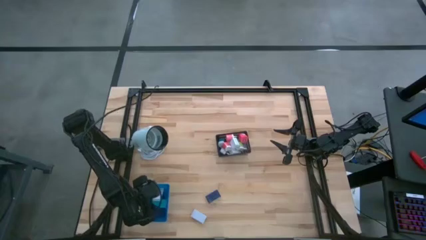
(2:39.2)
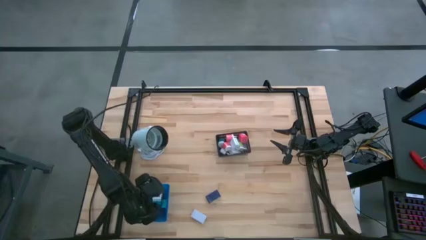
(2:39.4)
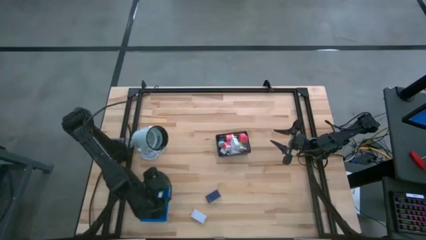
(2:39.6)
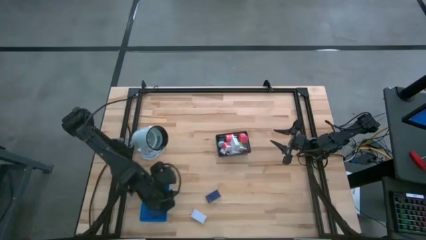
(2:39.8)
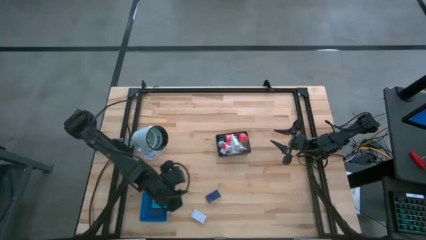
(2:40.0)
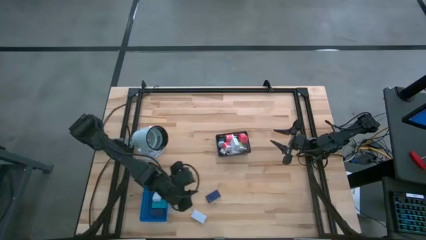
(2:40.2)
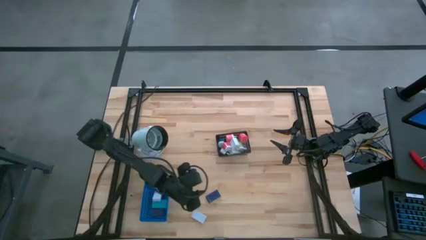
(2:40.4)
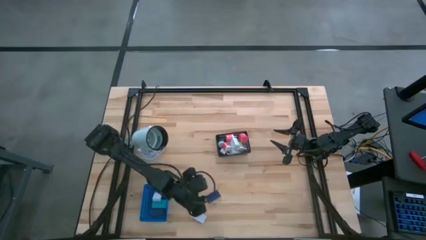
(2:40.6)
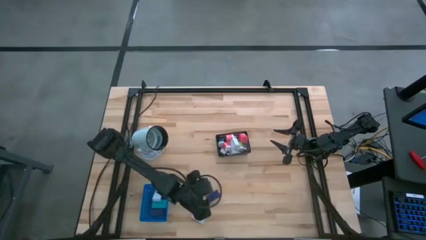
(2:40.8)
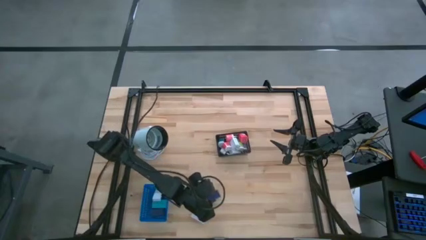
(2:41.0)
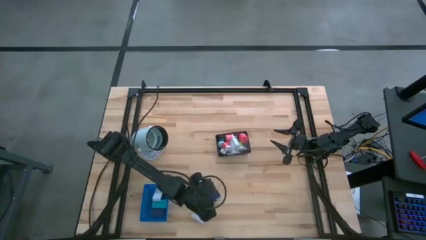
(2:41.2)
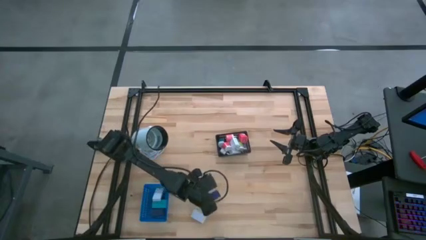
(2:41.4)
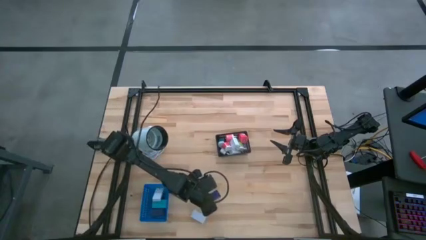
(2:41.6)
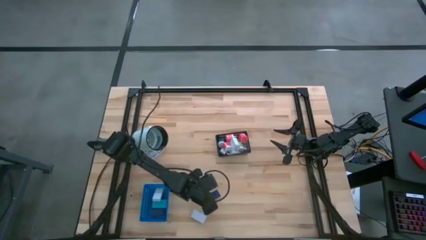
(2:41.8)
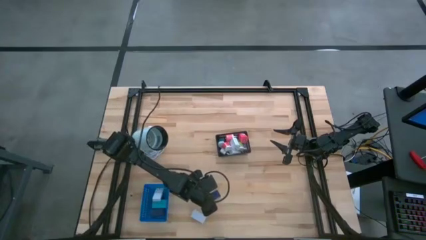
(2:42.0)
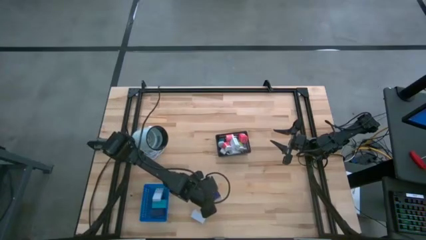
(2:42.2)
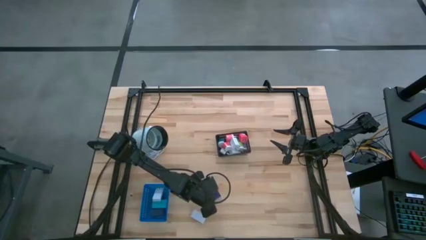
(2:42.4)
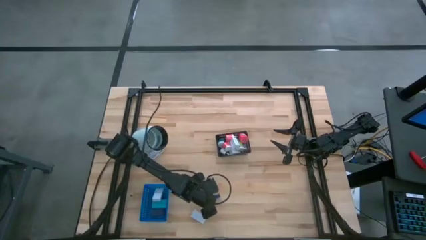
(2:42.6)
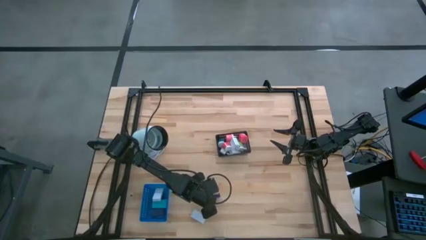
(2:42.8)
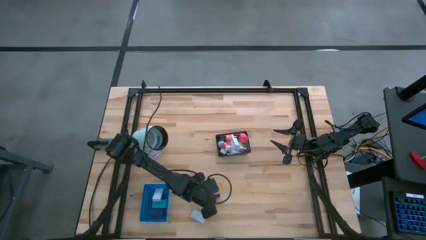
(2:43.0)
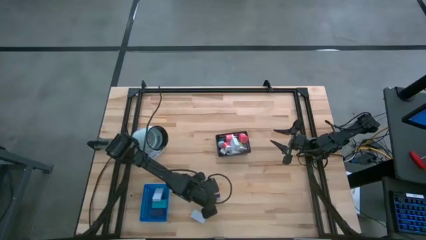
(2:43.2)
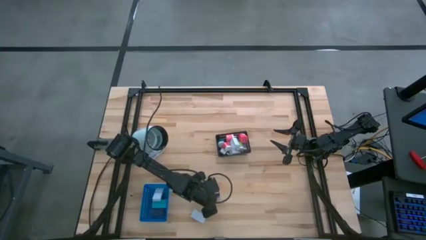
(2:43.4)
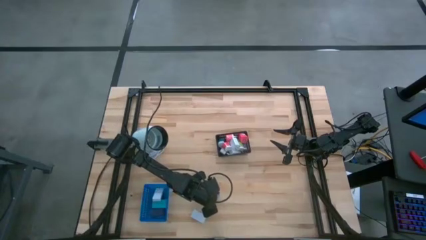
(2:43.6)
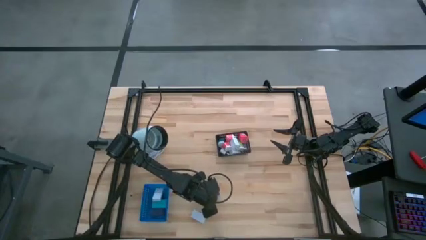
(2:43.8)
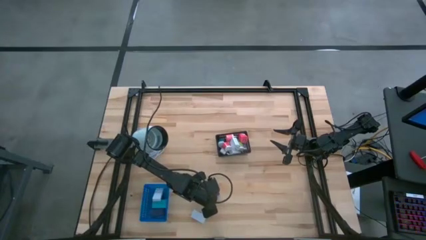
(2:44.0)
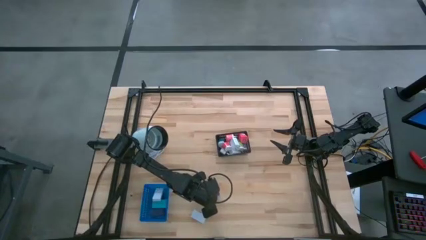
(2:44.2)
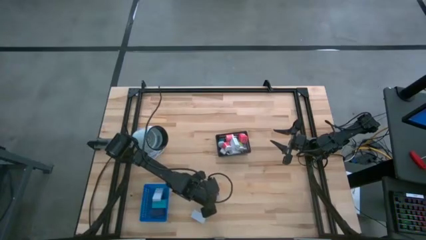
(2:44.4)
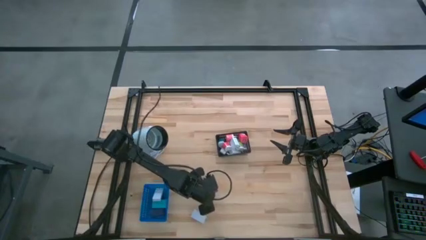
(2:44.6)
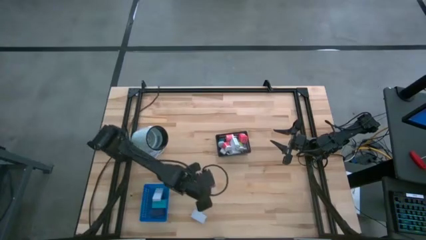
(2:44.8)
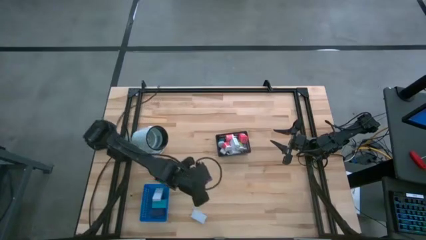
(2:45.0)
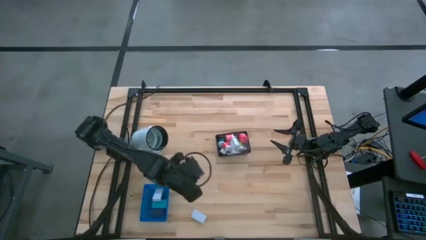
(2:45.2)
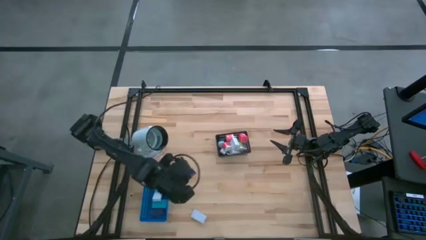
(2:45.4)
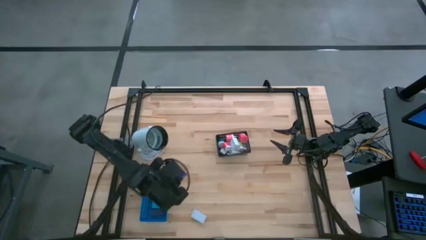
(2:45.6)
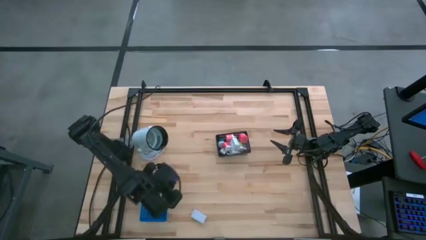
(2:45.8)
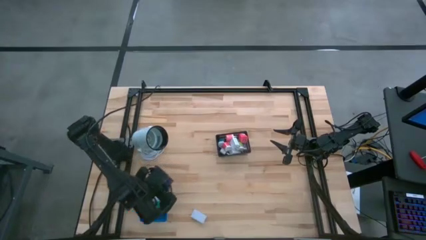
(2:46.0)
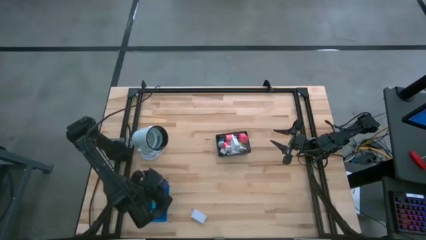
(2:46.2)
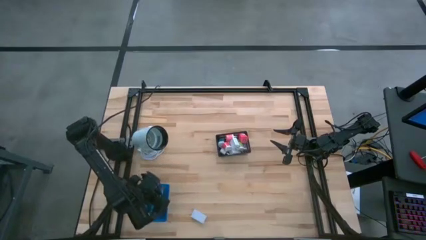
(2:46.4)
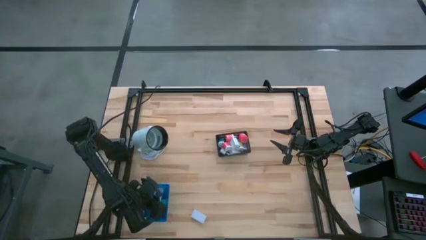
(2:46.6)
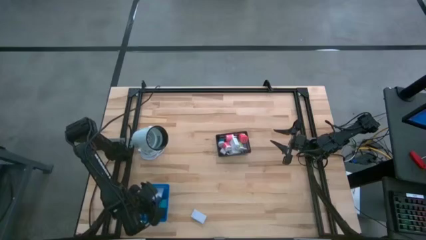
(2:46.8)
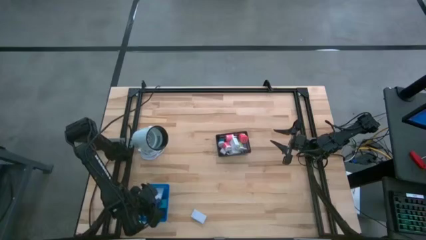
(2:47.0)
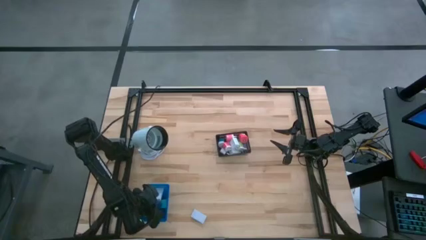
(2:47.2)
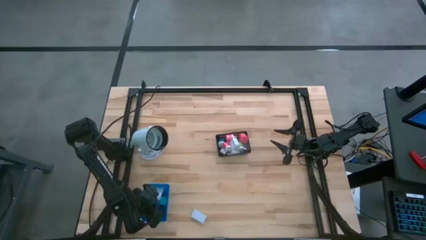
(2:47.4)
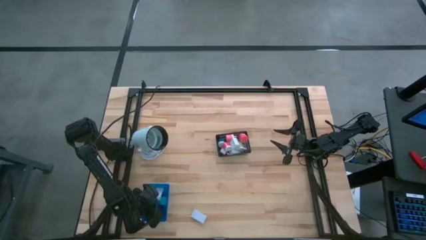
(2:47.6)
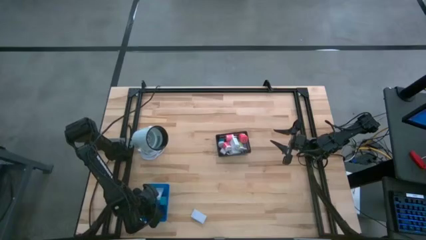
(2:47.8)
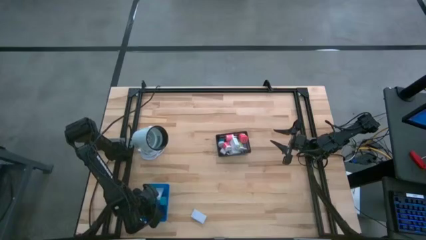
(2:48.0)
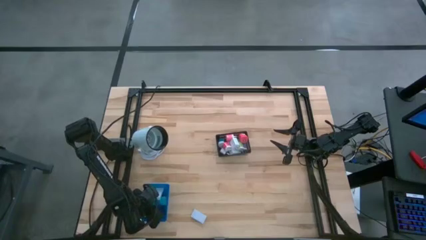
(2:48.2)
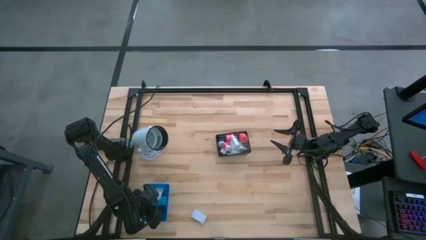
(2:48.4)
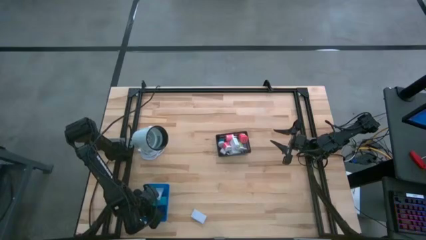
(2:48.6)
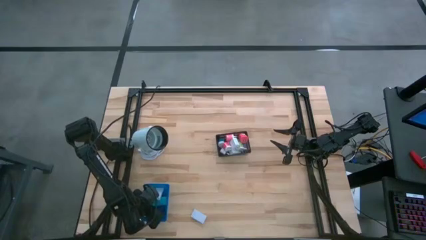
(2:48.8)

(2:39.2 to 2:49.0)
Task: Pick & Place Office items
Put the blue digital timer into the blue bin

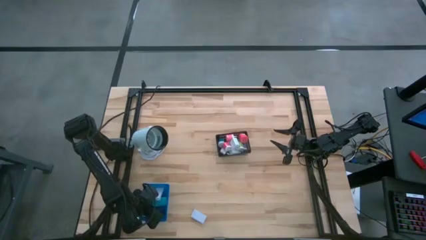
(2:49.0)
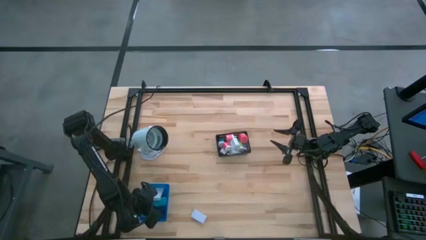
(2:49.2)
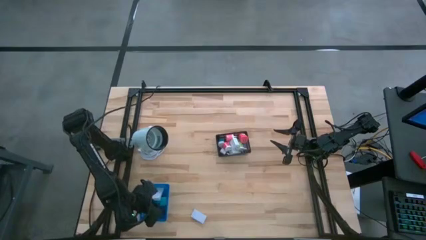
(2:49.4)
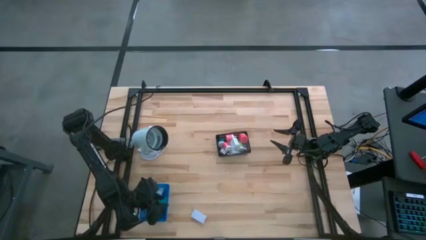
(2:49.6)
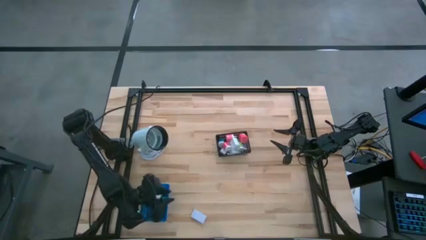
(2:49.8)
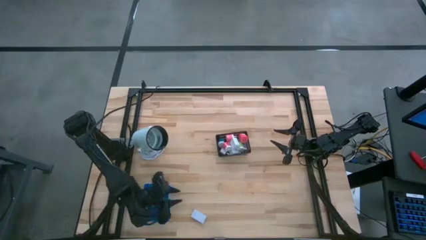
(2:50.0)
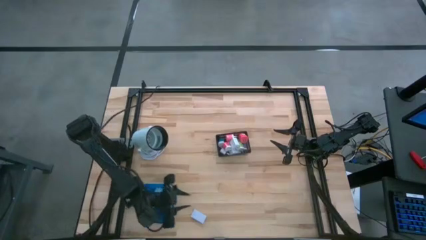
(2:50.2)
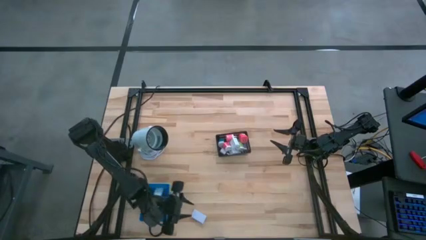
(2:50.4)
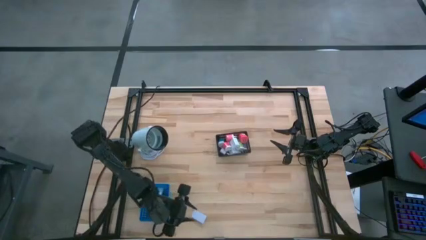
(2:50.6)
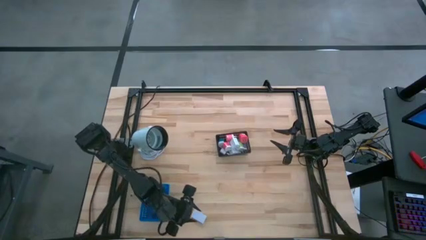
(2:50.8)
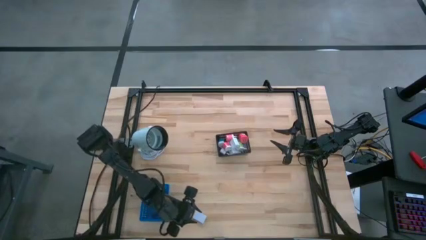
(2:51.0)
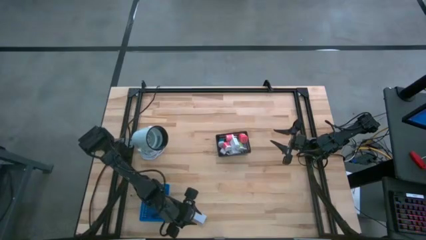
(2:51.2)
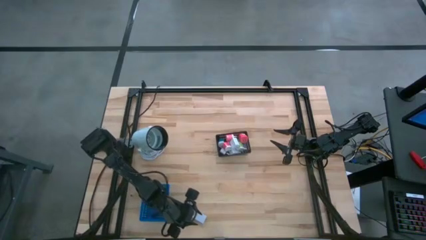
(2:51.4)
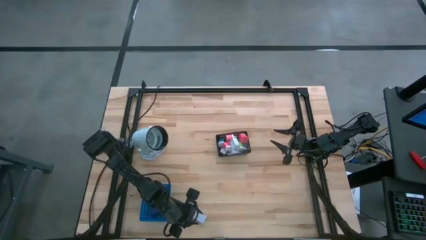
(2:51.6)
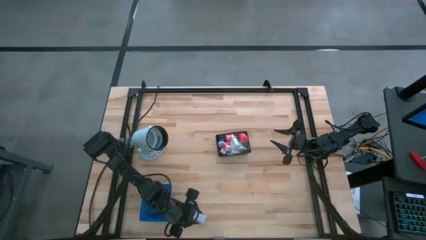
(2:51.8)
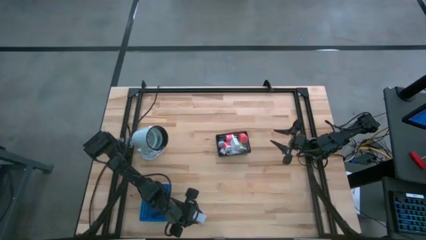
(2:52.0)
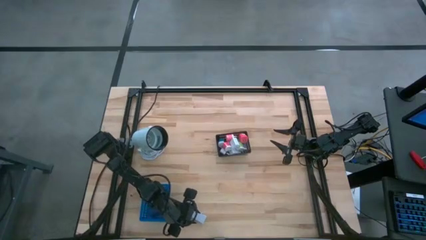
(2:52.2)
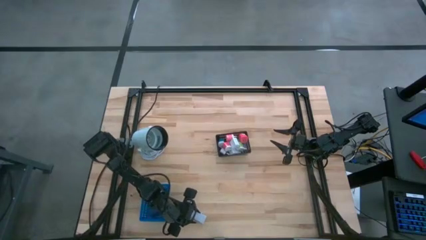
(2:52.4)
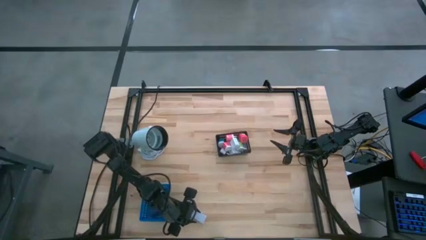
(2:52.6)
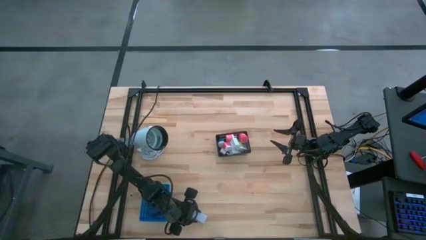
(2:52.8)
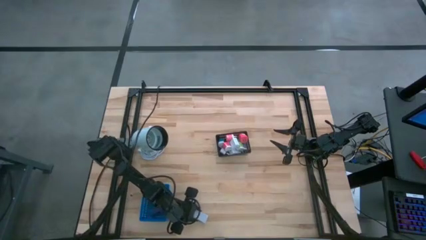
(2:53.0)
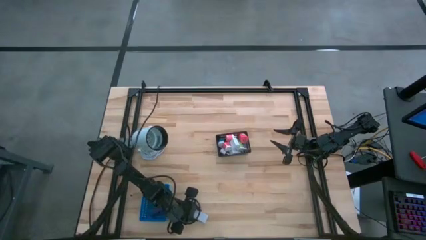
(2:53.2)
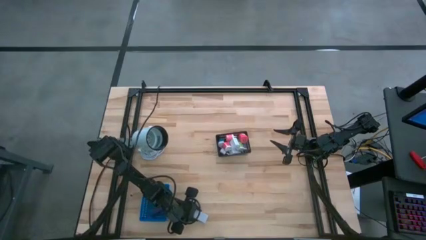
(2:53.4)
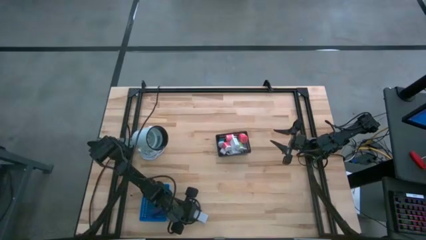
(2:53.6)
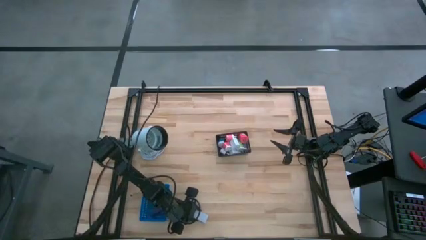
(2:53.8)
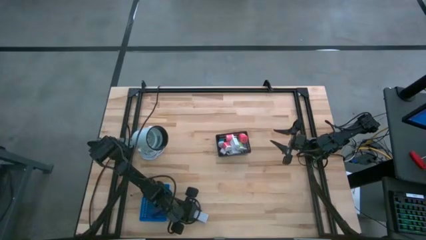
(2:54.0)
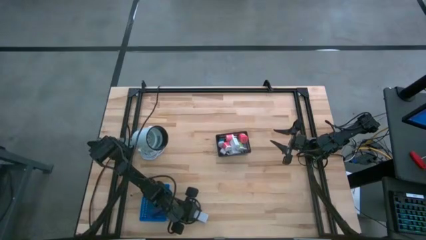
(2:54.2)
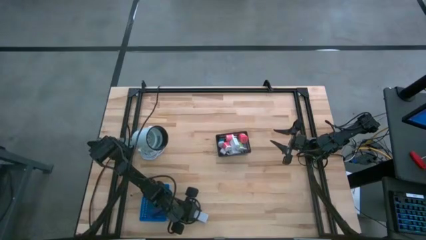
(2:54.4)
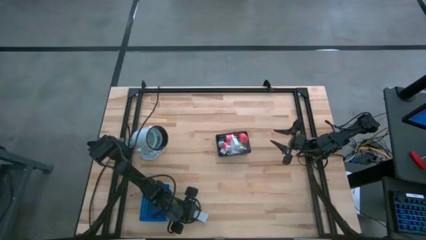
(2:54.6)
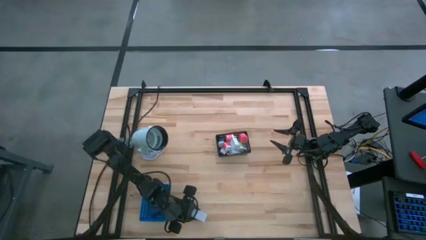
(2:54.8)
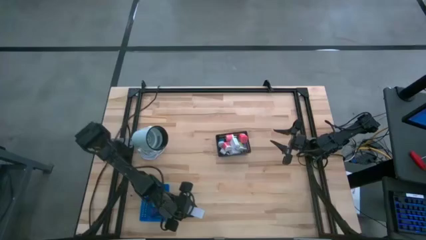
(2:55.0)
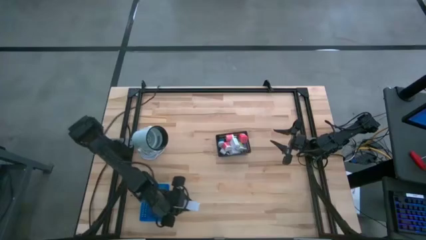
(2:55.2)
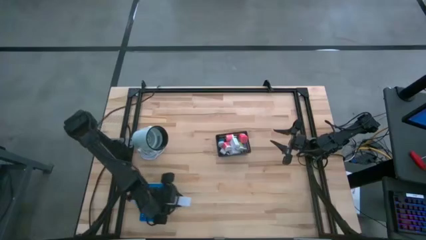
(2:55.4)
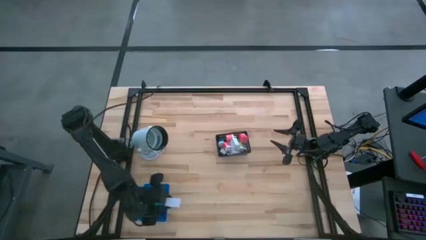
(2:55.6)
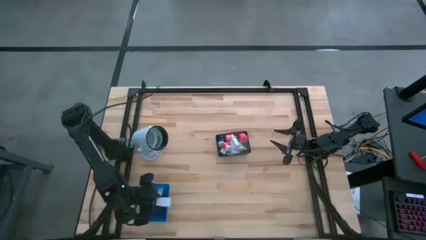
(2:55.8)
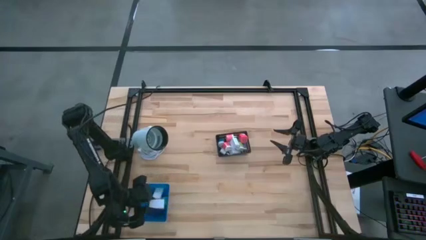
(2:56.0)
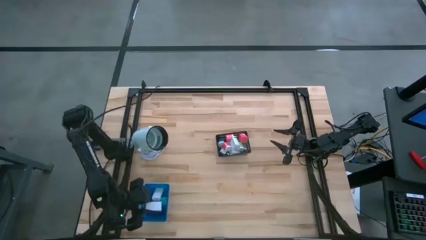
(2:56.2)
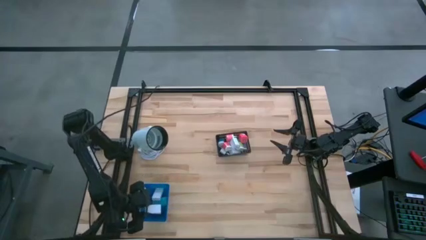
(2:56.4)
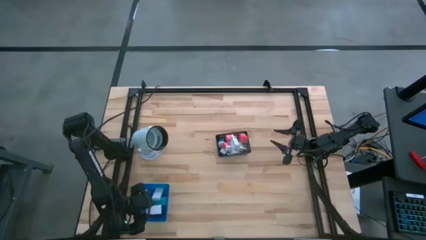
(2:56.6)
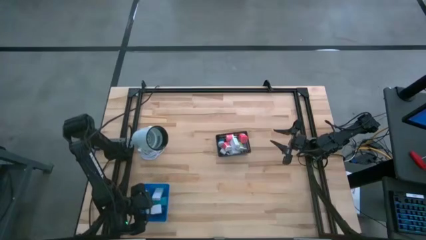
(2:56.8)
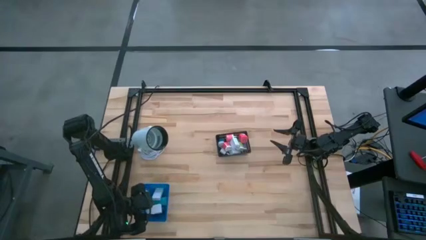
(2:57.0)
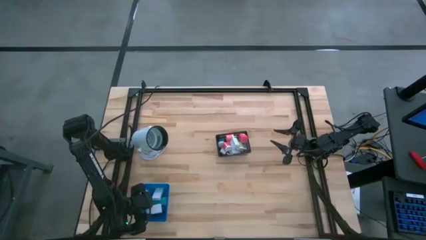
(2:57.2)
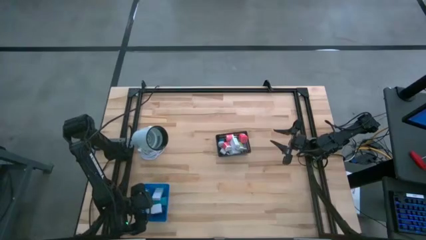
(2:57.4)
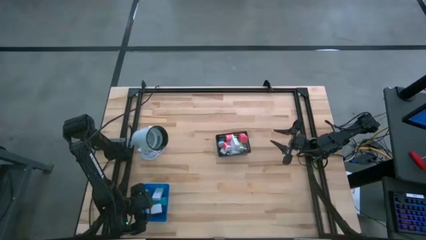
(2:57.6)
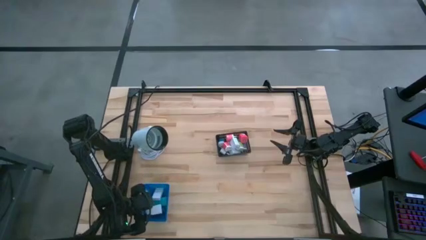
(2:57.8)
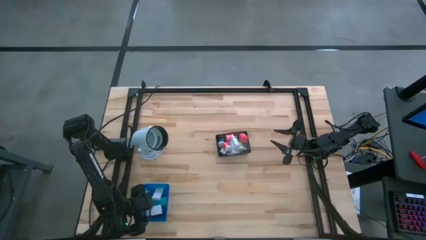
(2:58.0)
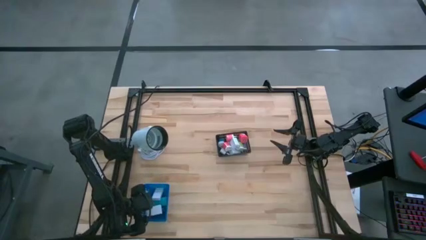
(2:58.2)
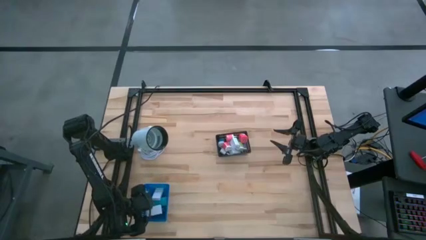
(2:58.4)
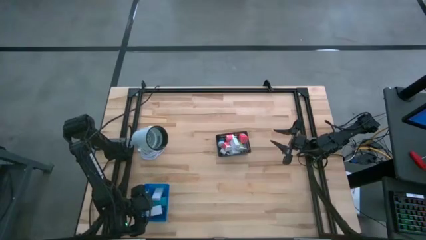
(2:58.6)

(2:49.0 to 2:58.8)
Put the white digital timer into the blue bin
